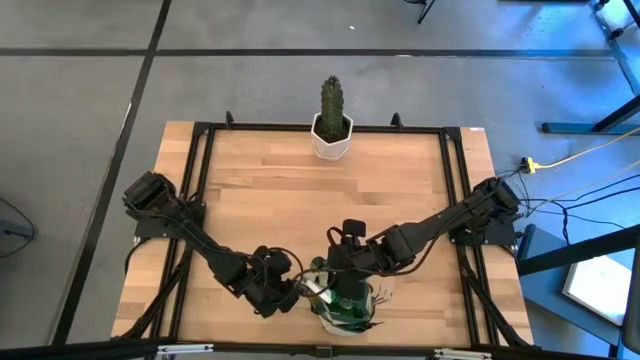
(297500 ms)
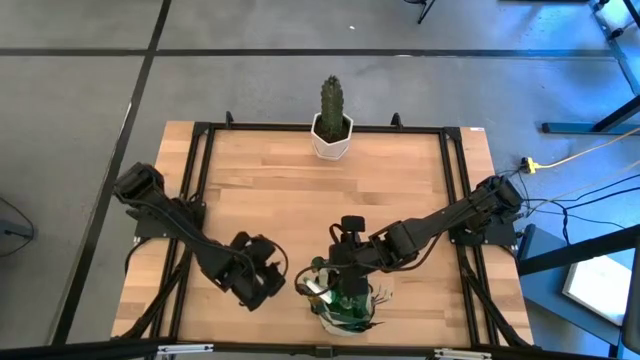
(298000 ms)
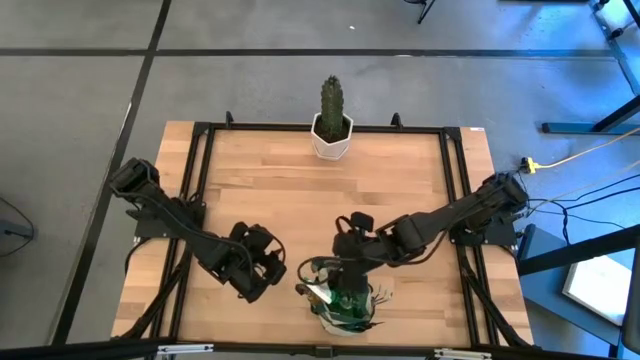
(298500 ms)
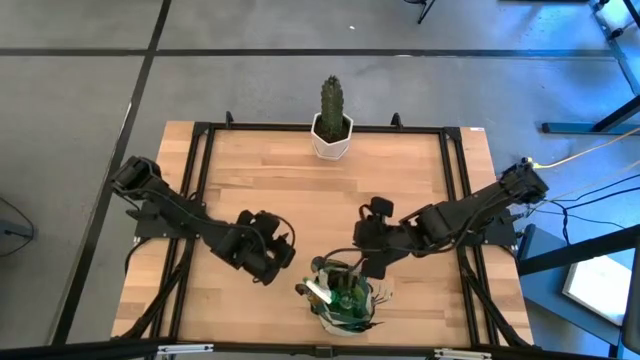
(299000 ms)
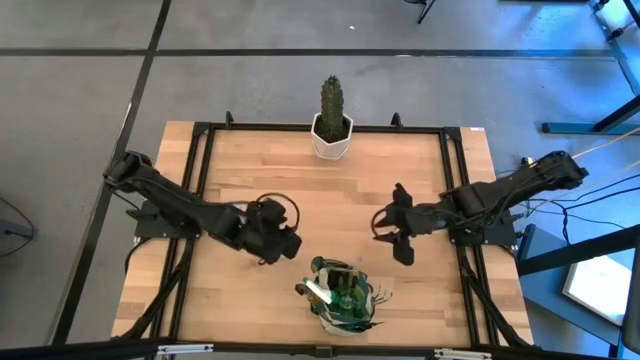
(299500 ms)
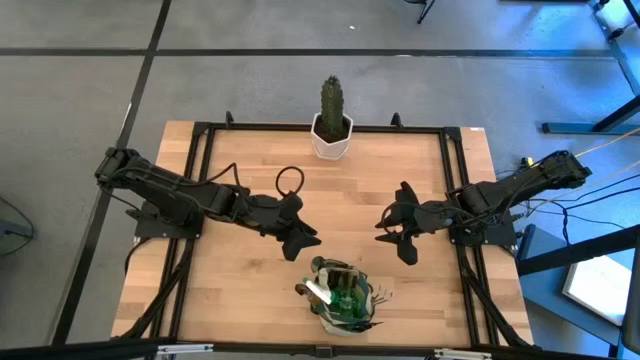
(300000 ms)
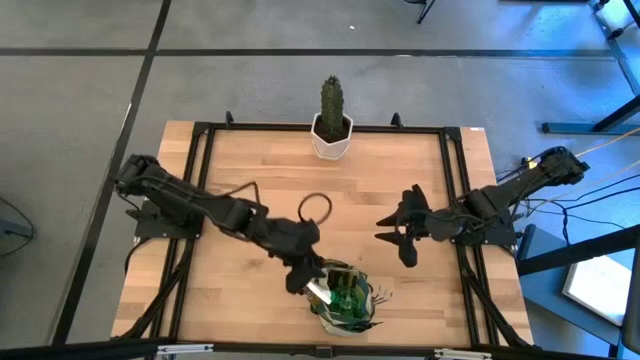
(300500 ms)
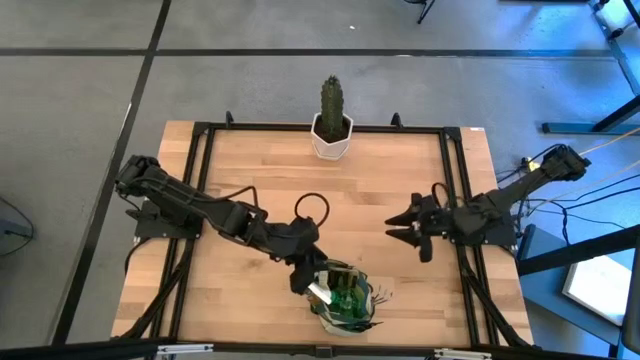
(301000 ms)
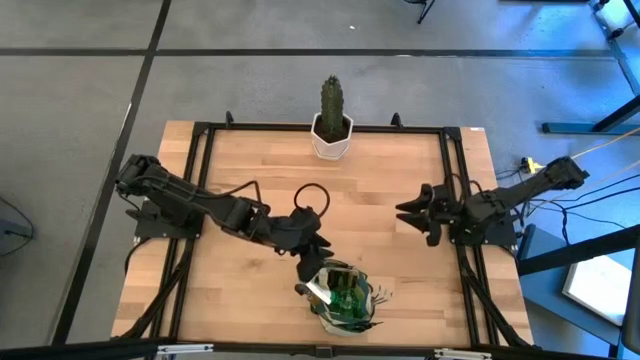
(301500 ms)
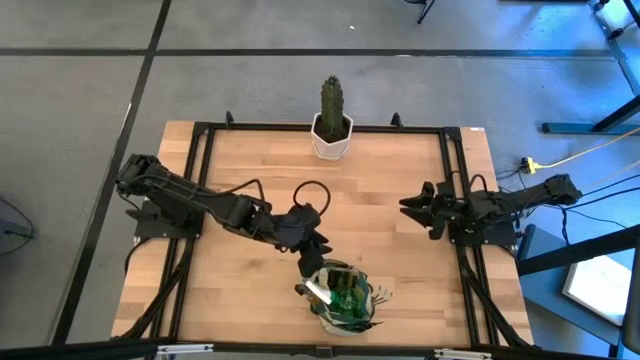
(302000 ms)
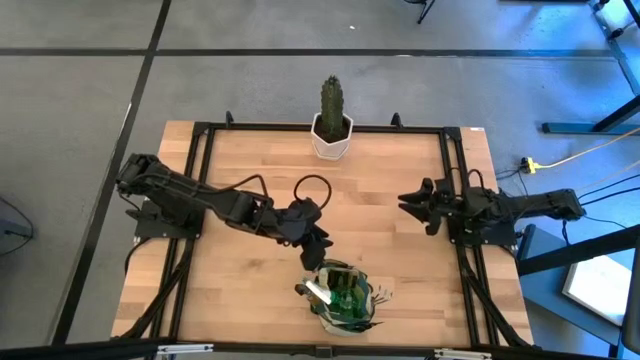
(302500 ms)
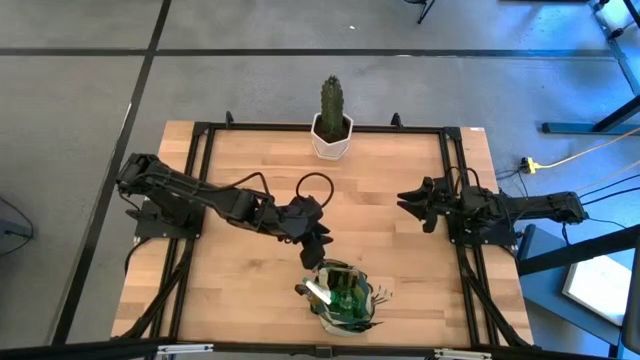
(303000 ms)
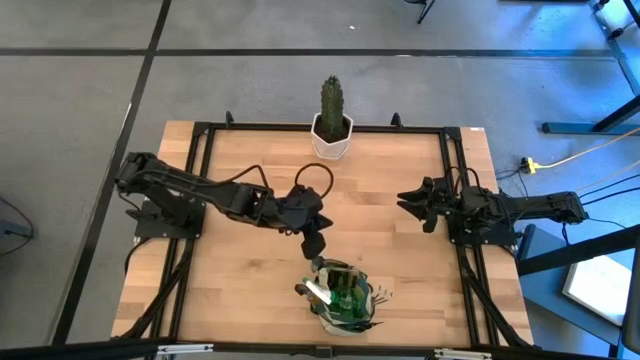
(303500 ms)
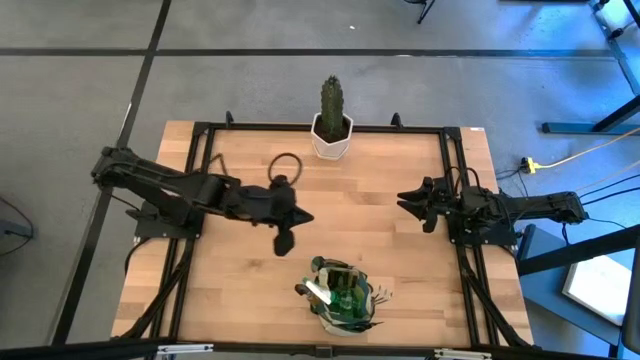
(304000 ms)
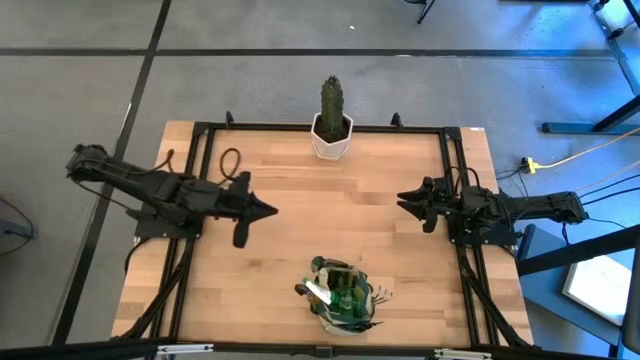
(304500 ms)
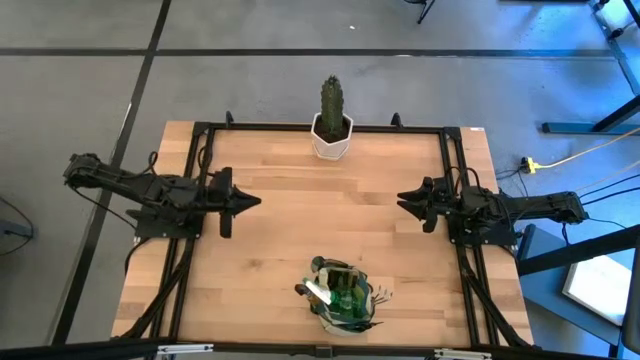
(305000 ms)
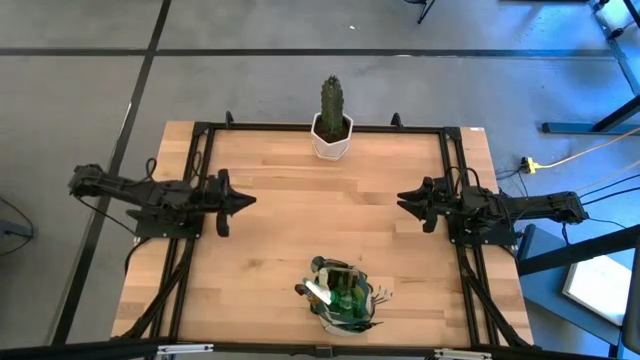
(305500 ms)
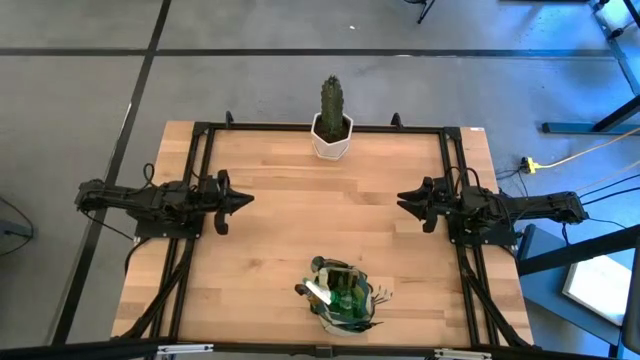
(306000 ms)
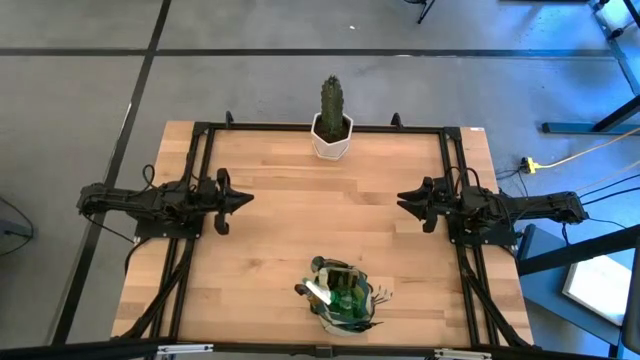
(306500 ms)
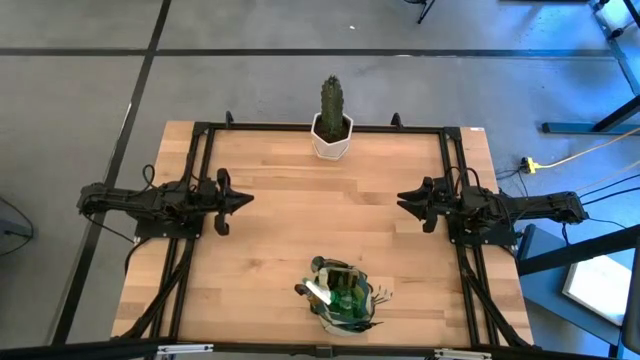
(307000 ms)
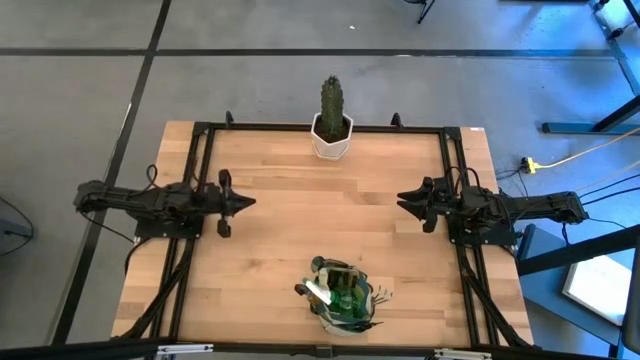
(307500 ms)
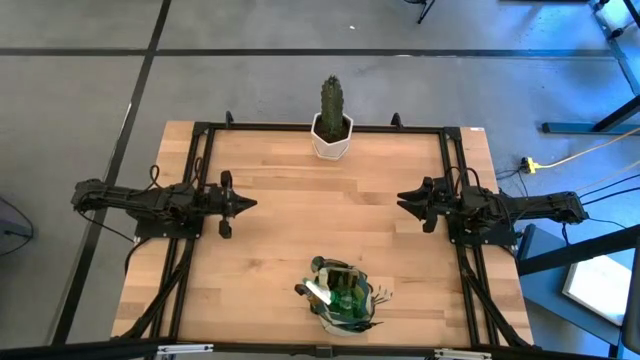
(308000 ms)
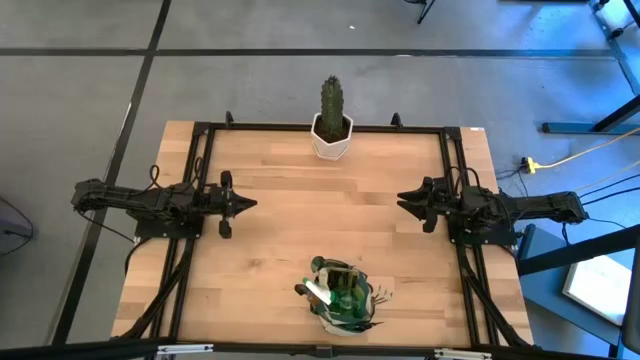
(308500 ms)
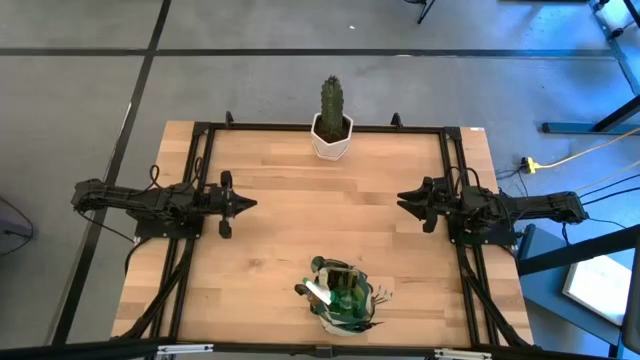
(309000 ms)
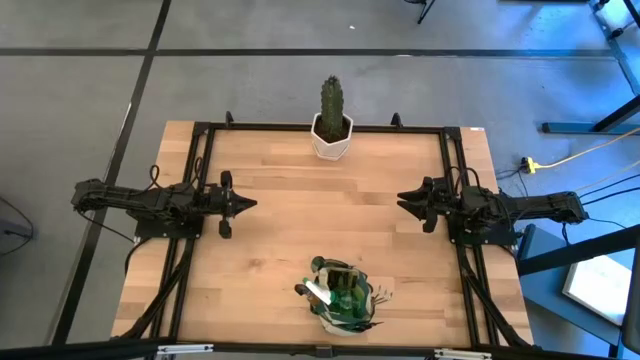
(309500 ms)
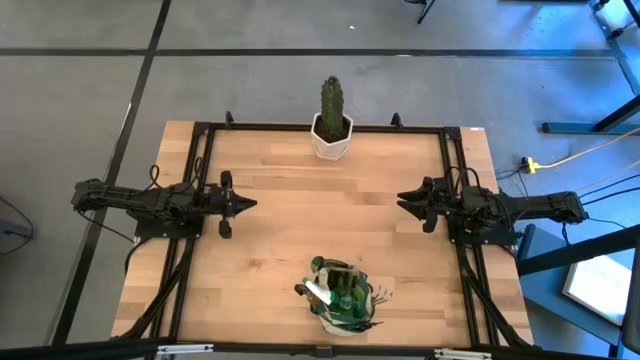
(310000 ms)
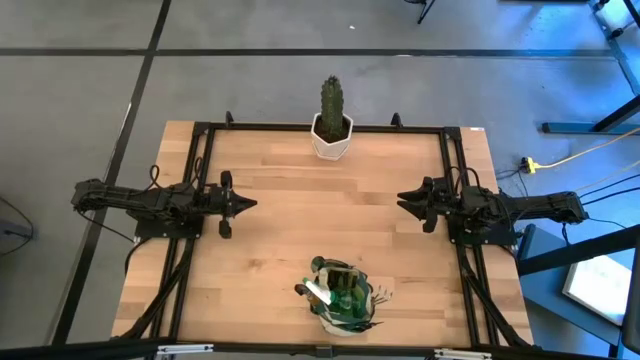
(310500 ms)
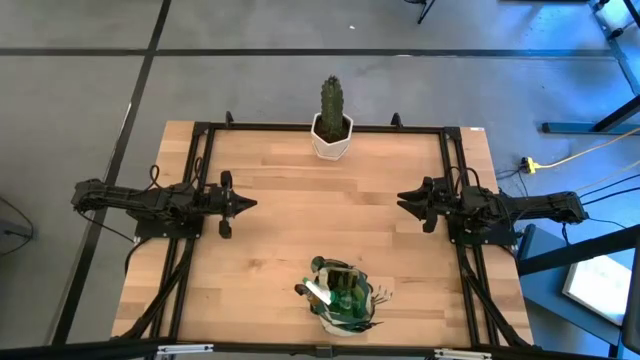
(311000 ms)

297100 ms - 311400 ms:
Task: Pick & Place Garden tools in Gardening bag
Return to Home Position

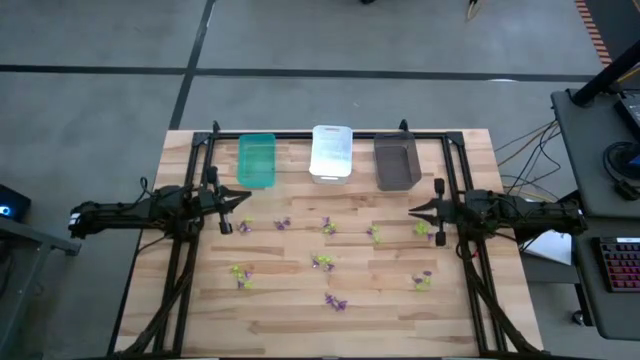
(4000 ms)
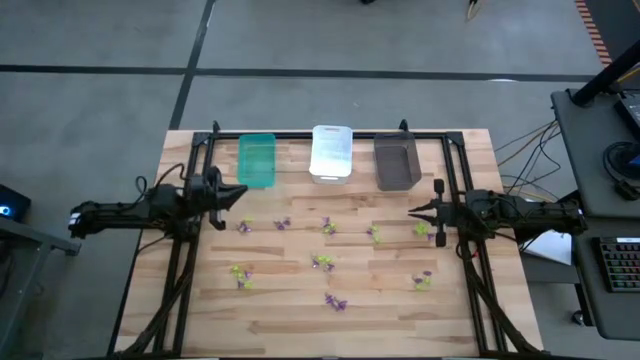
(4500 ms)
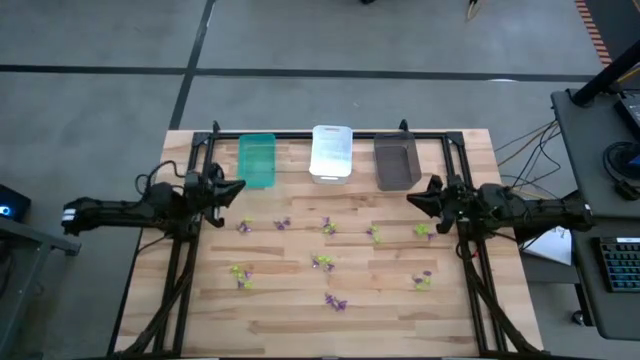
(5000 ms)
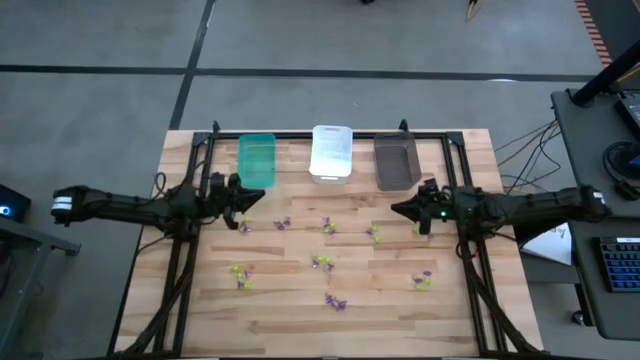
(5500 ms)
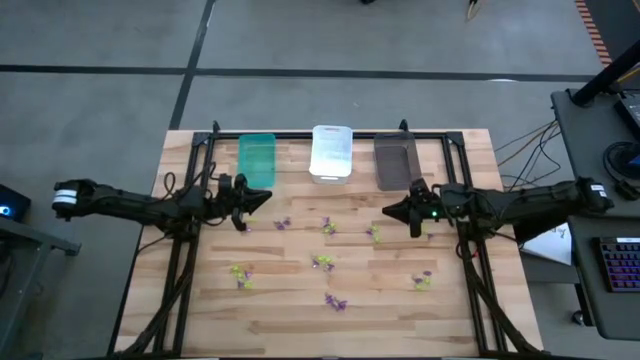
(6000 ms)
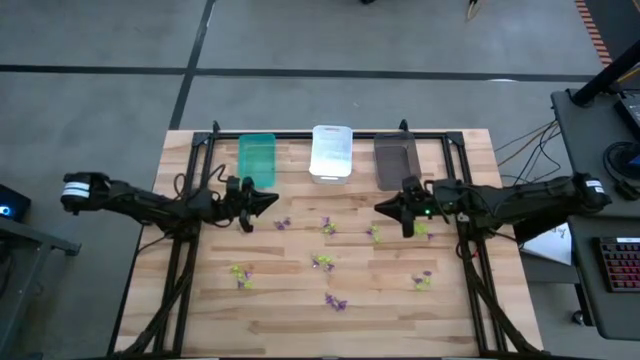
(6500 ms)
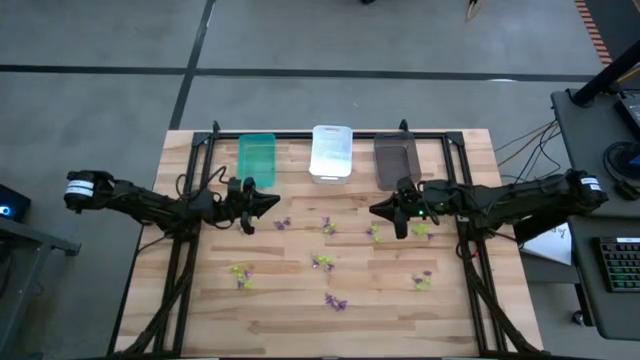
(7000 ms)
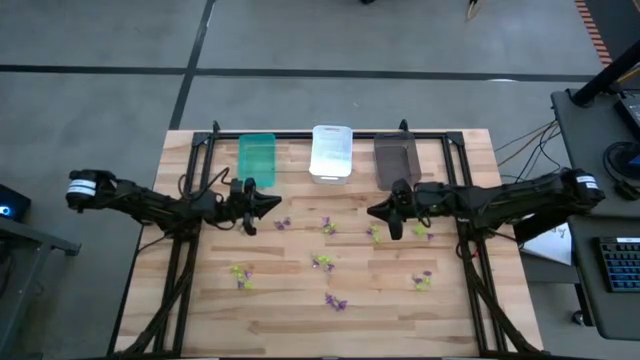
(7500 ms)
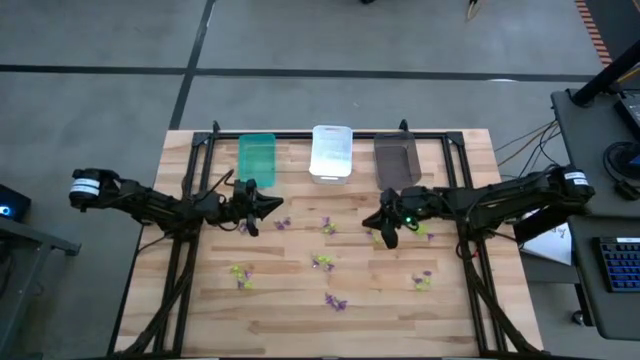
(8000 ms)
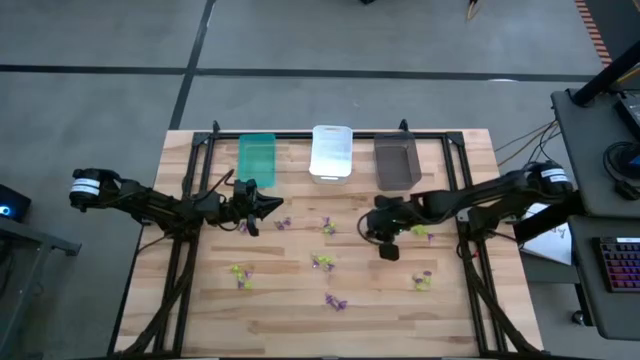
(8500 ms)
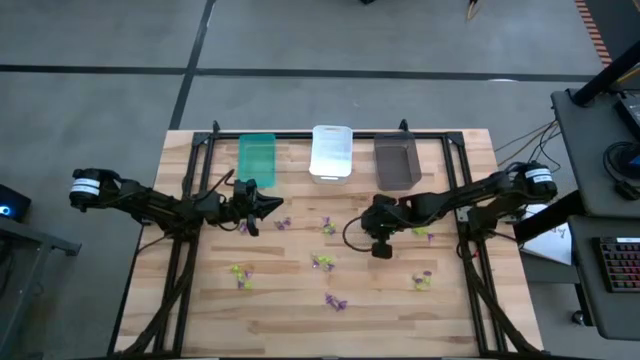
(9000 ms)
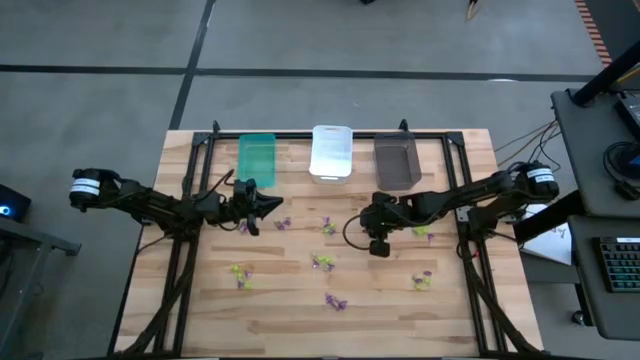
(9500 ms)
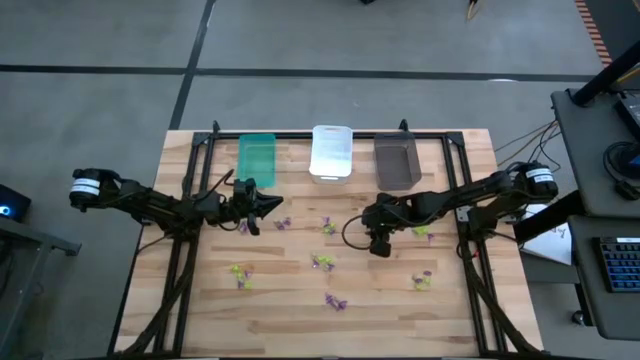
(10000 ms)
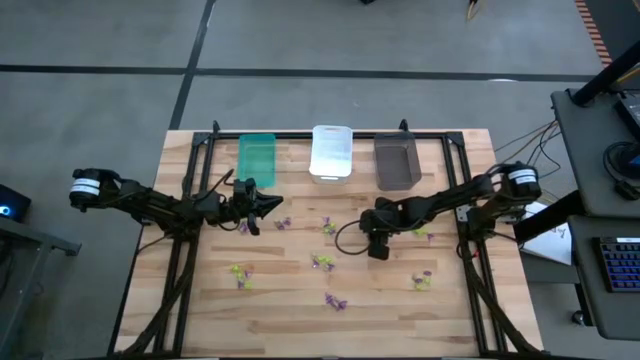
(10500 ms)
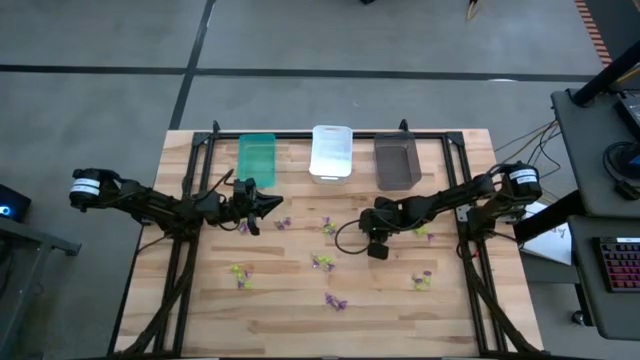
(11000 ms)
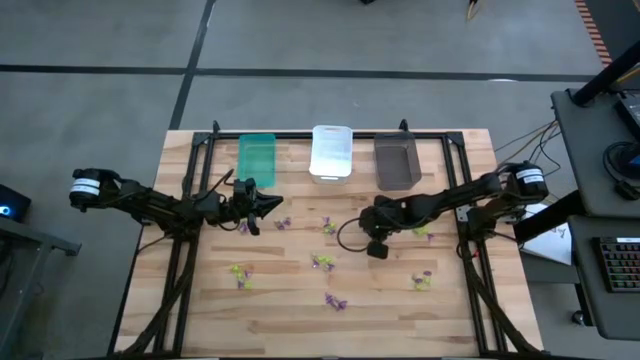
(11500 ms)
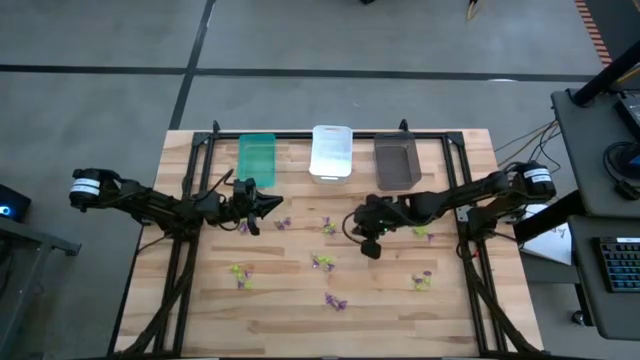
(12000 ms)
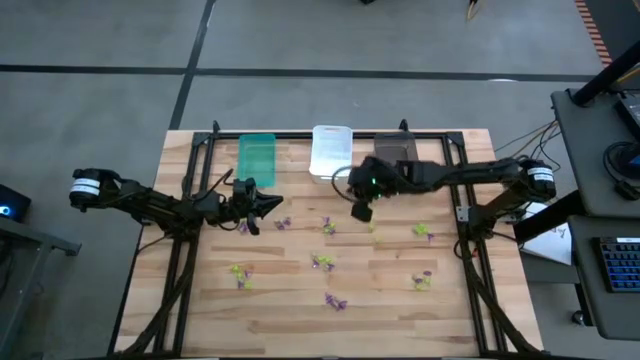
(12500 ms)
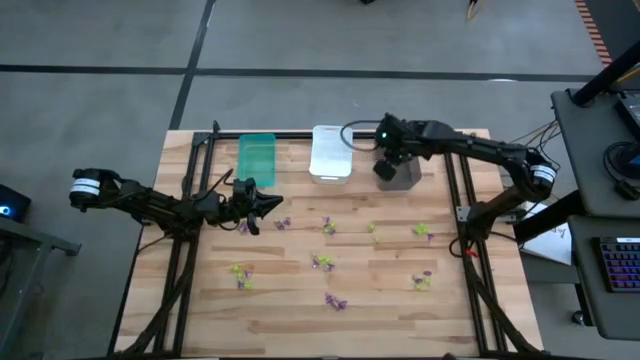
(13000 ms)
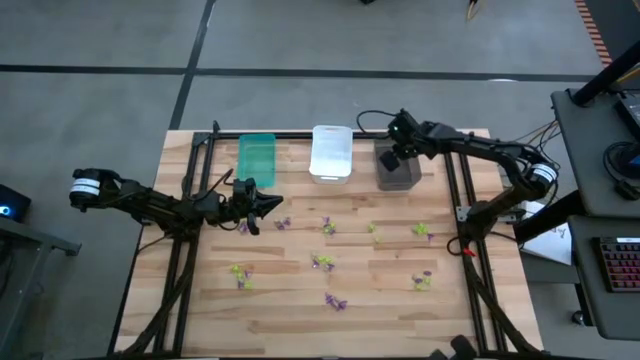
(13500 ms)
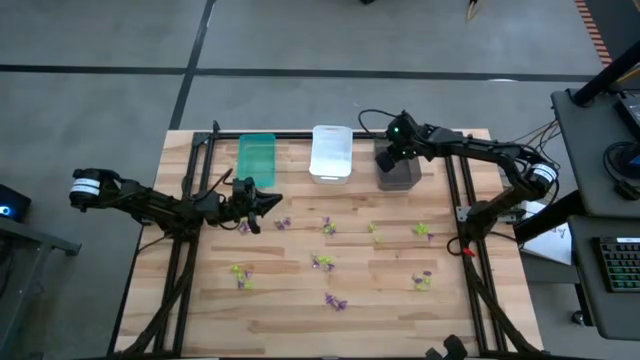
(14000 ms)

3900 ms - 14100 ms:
Task: Sort Halloween decoration
Put the purple witch hat toy into the gray bin
